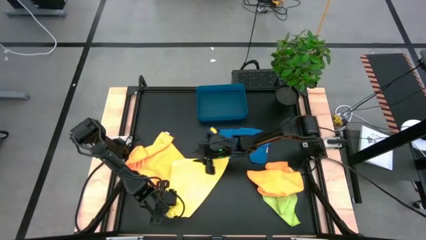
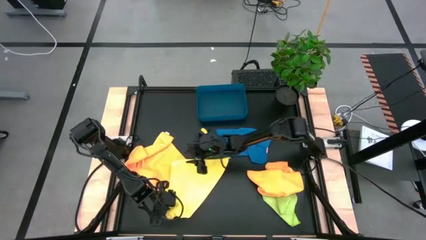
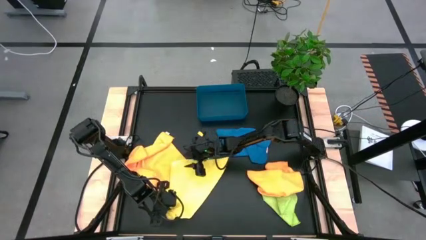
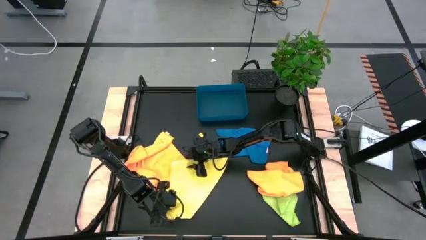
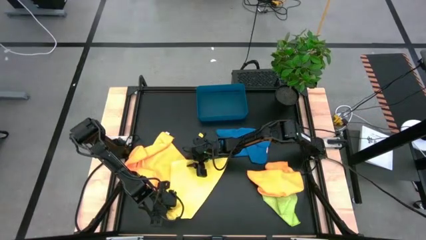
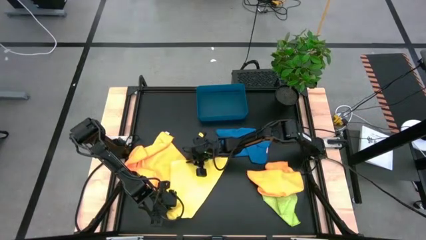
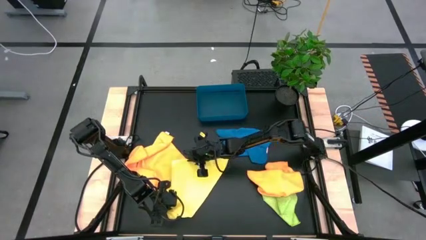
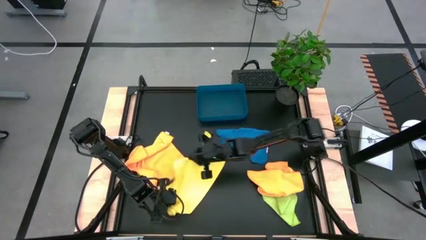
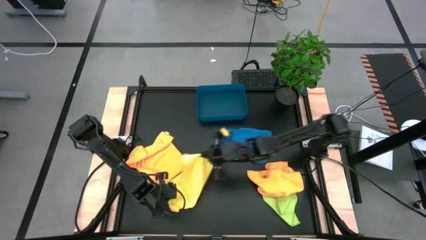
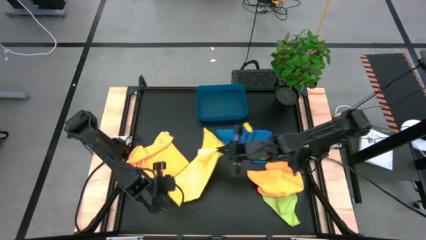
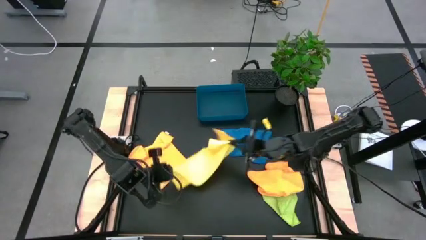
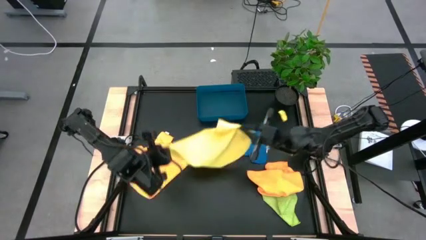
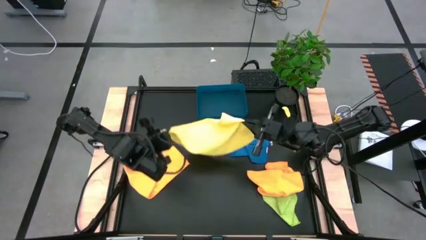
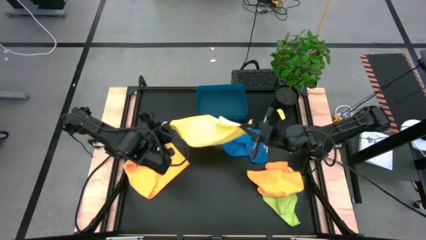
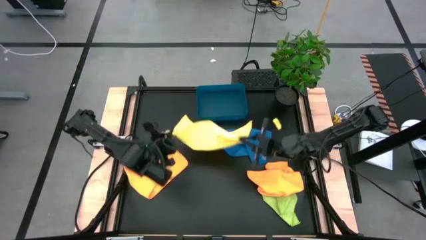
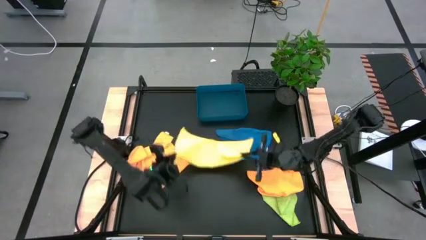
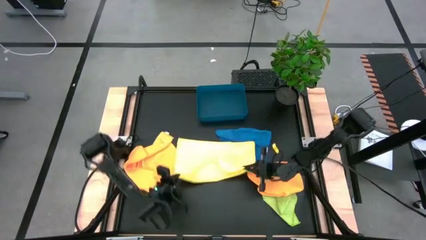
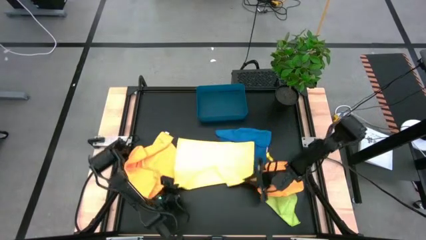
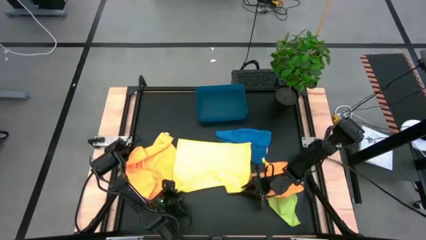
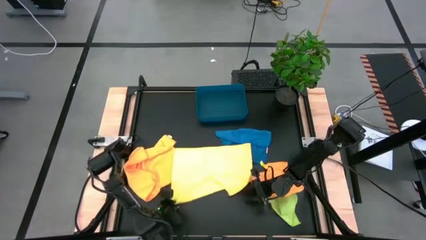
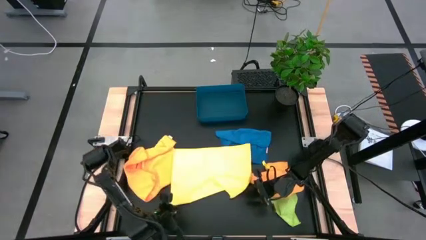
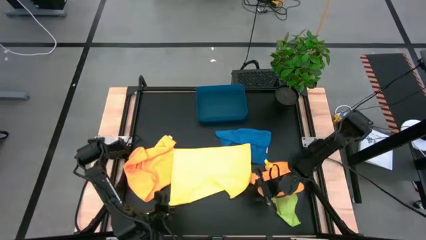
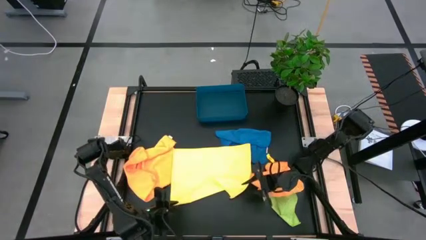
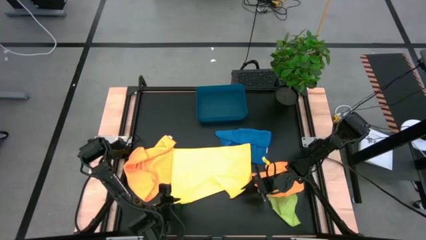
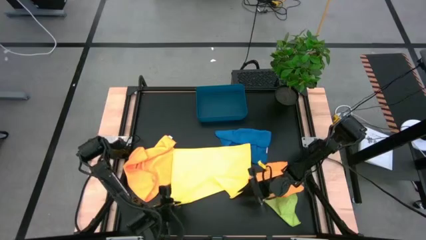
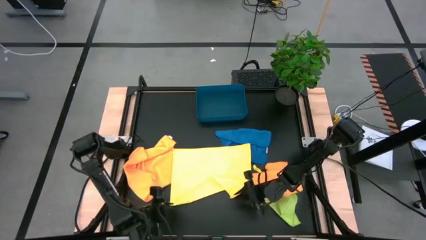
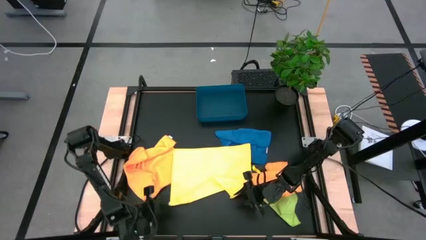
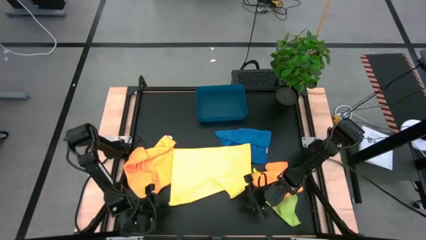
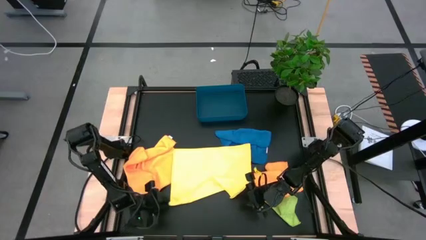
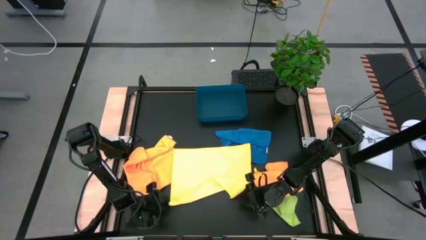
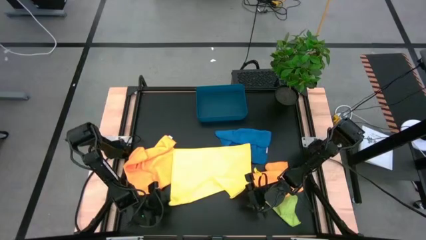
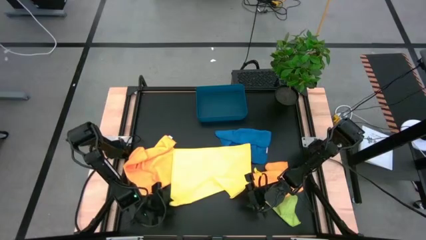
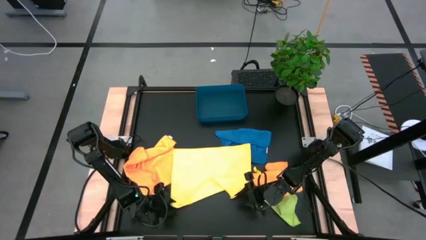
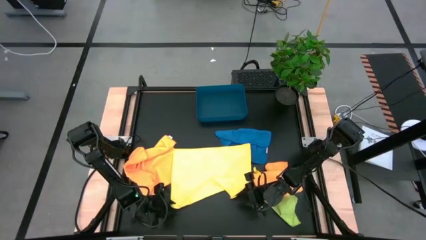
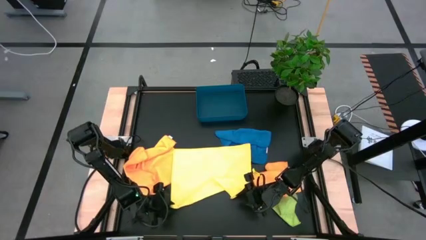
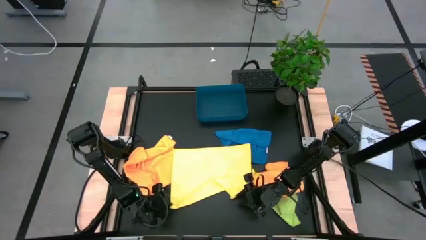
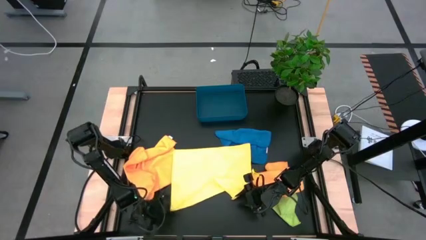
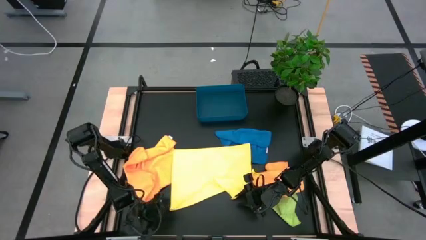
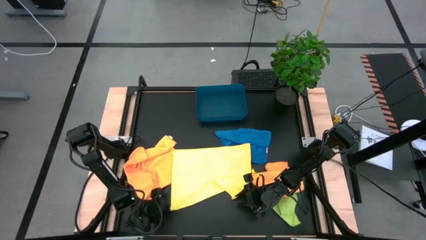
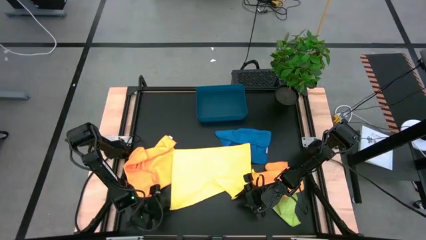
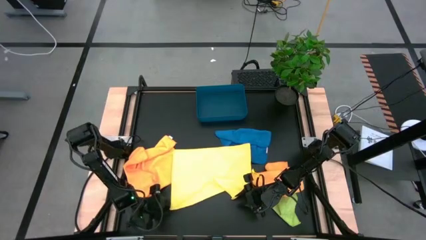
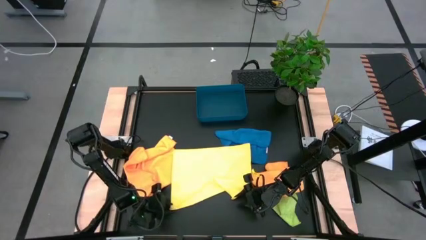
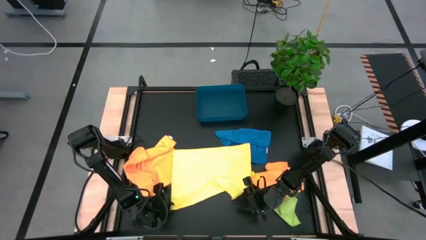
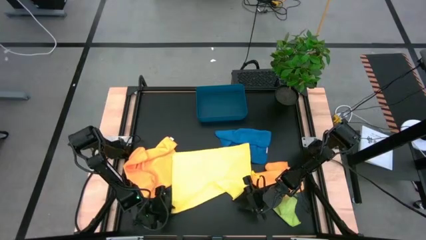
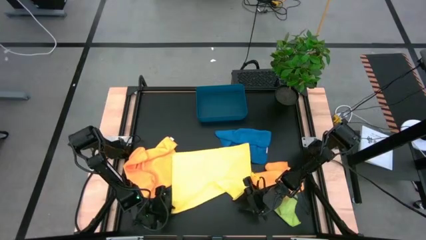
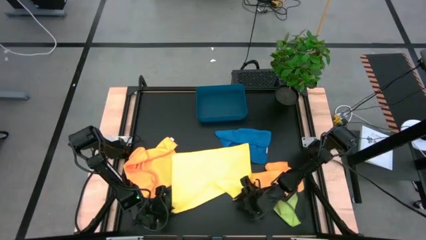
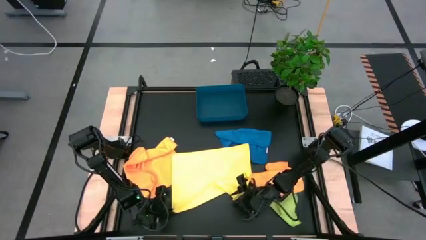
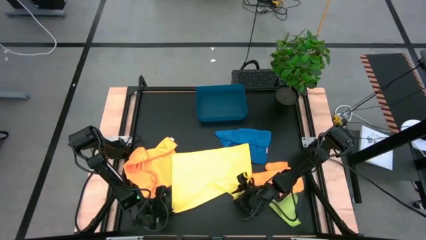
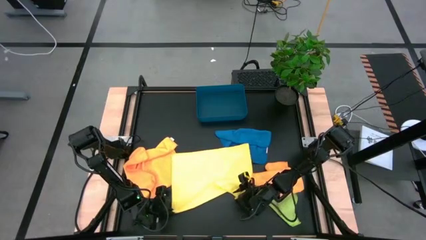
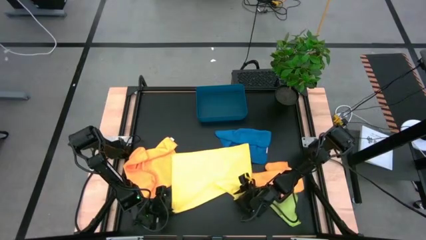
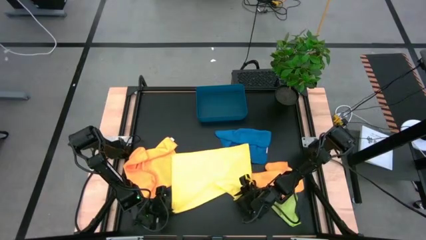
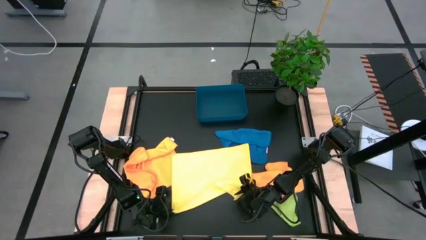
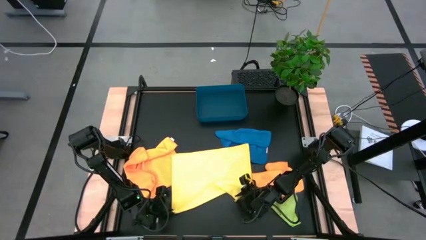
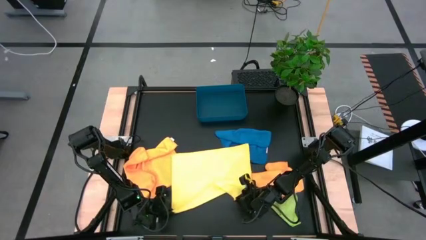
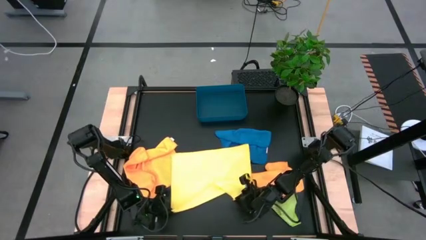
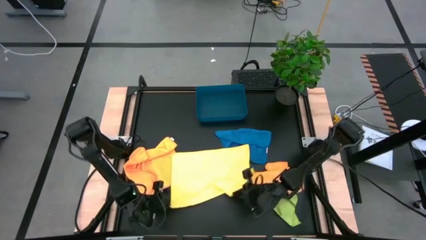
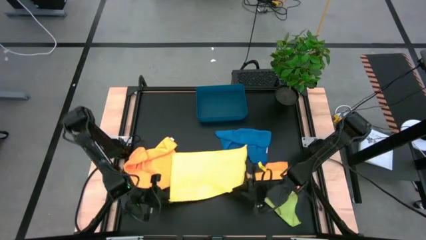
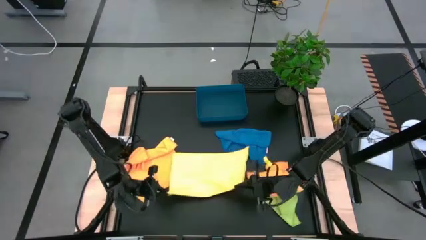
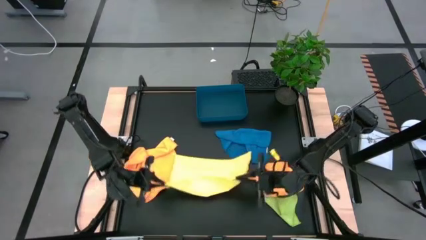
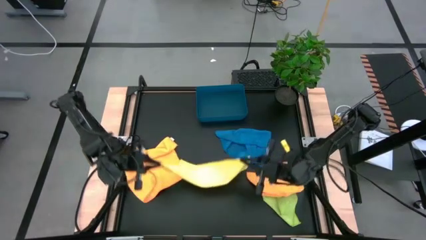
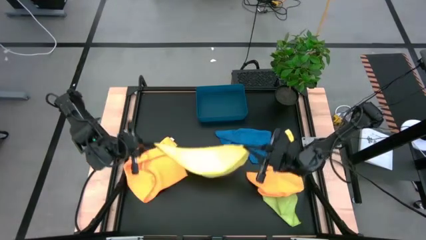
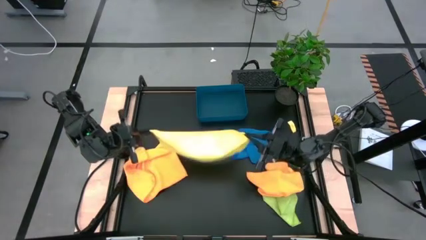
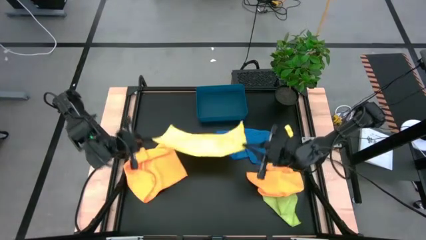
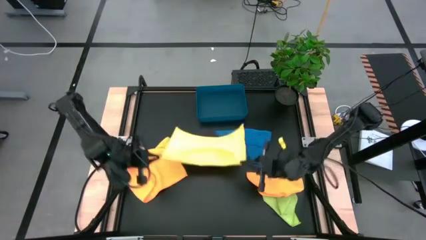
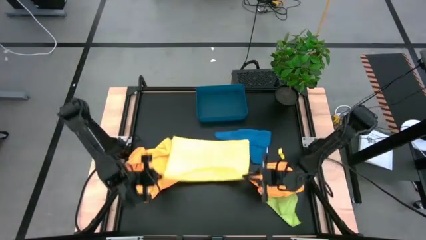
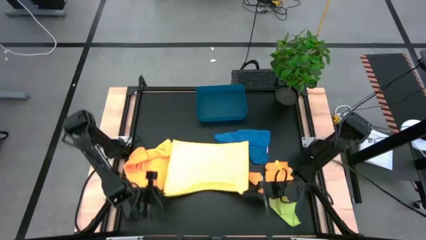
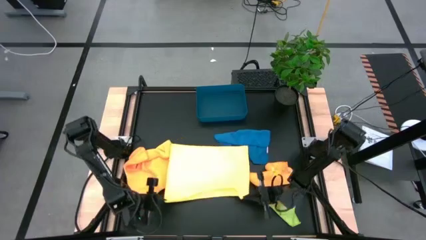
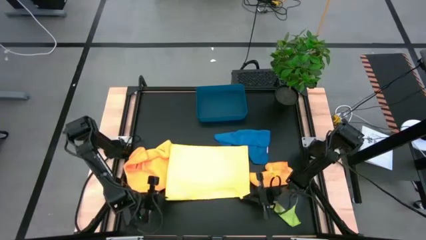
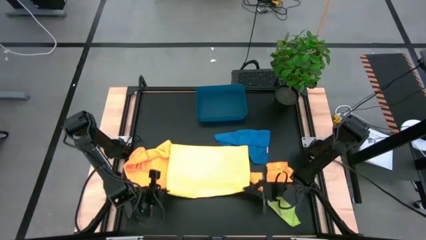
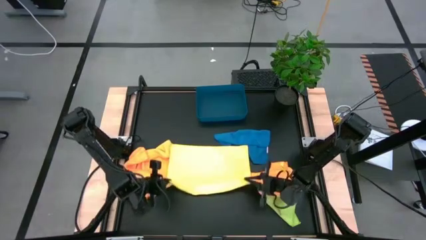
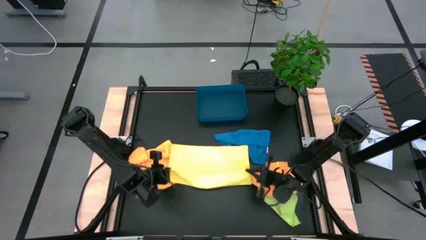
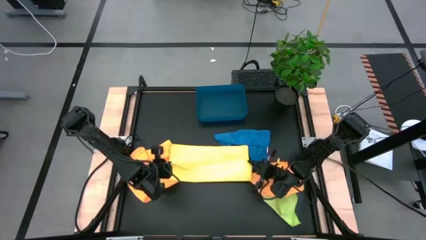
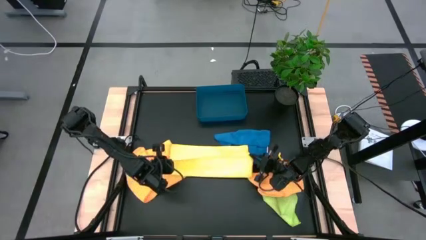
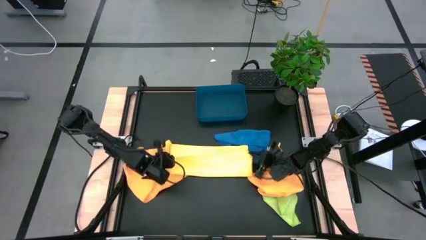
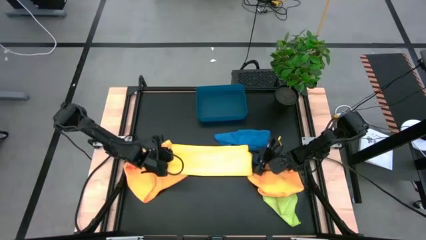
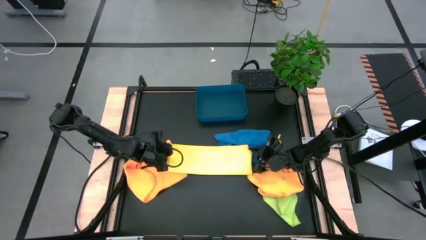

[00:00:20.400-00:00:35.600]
Task: Fold microfiber towels
Fold the yellow microfiber towel
